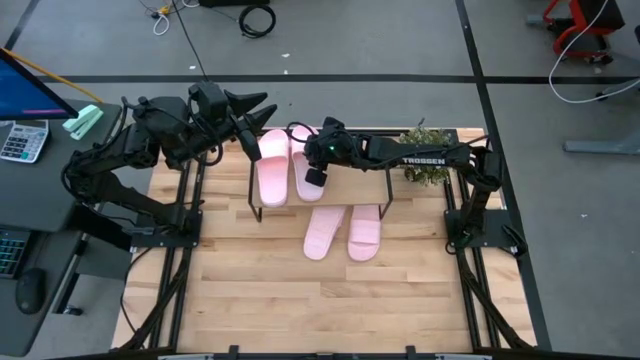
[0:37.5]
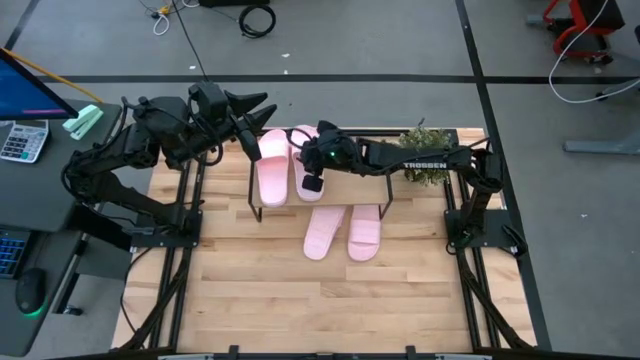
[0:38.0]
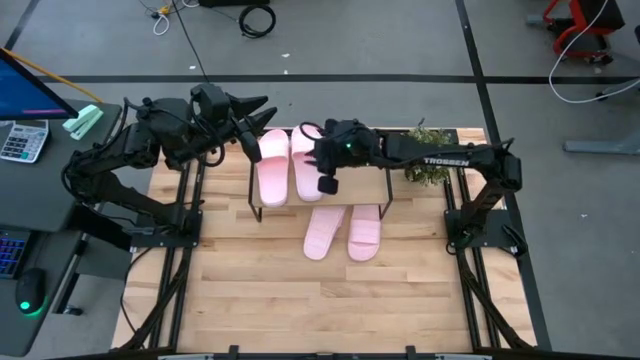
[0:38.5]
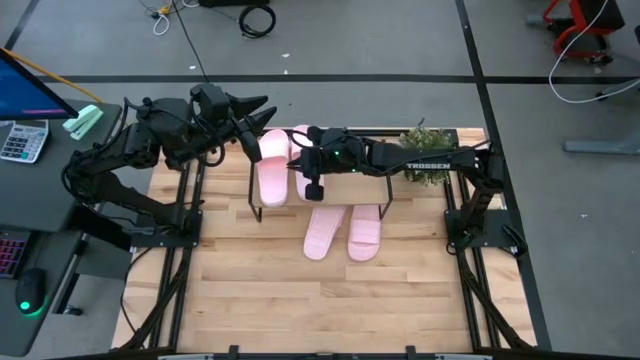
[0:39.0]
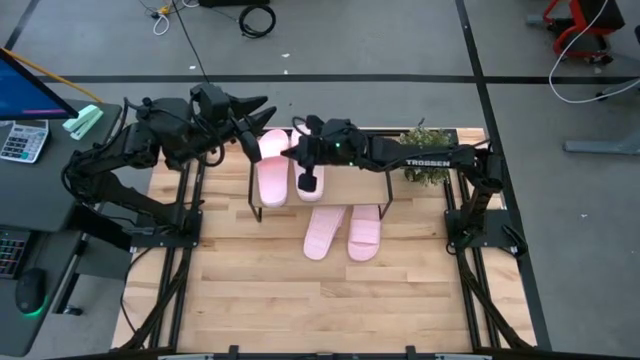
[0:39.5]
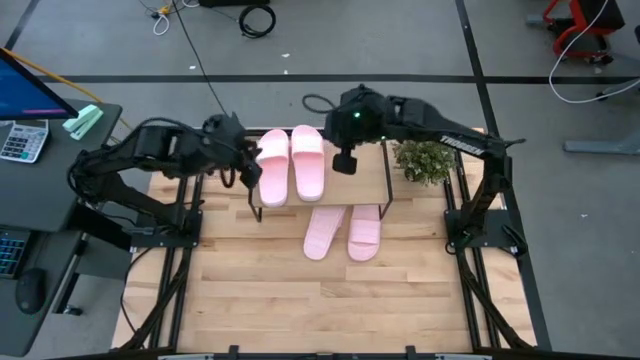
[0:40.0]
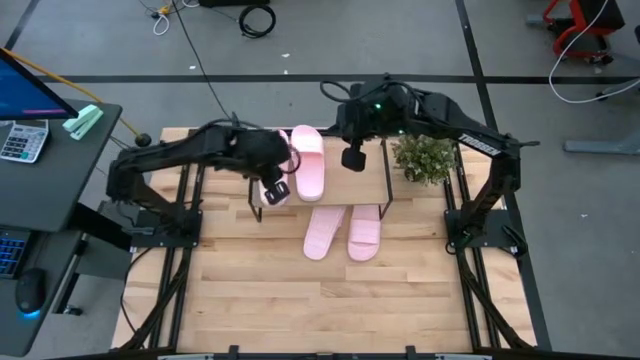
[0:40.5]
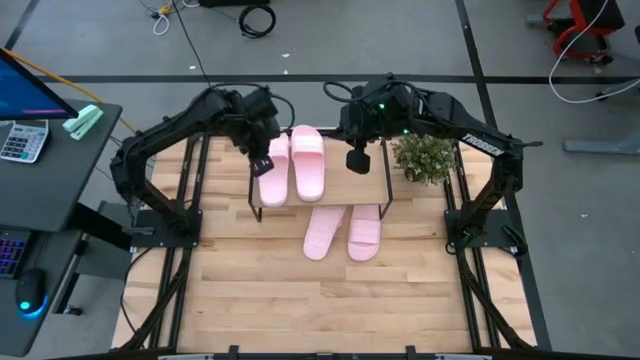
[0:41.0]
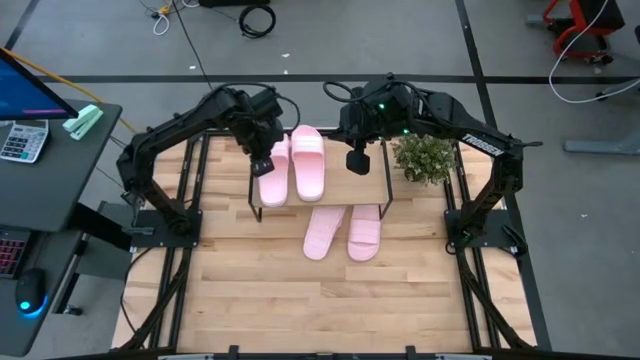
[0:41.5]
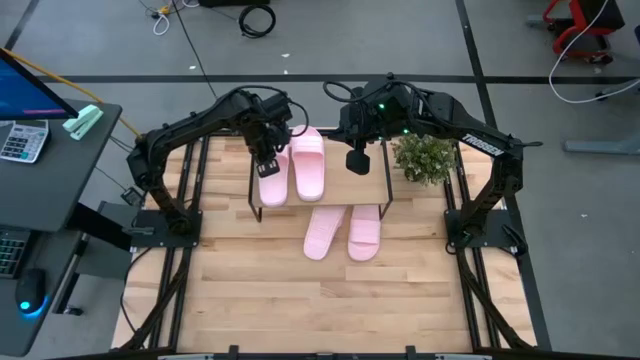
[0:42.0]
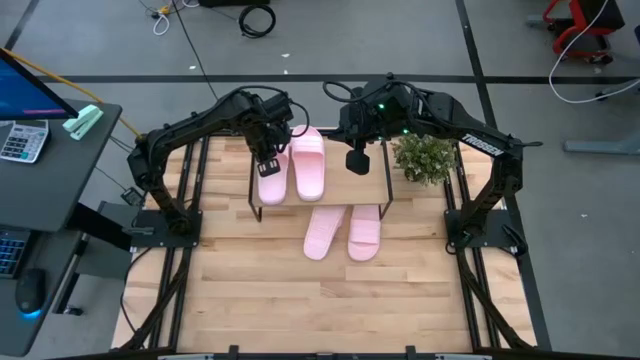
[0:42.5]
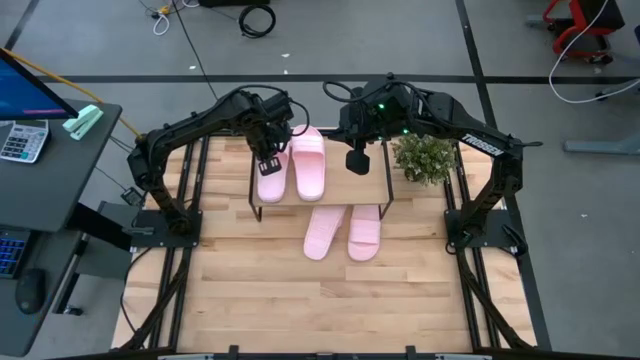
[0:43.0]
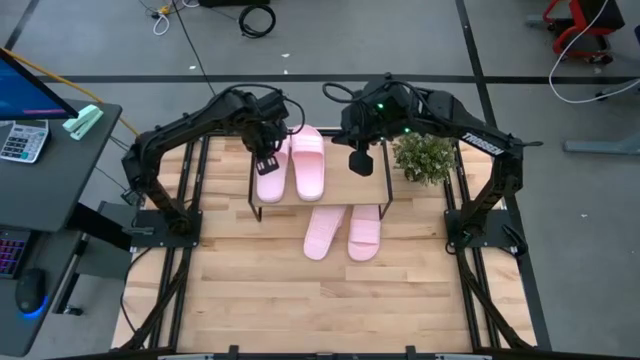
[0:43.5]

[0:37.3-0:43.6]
Task: Pick and place slides into the shelf
Adjust the pink slipper on the shelf

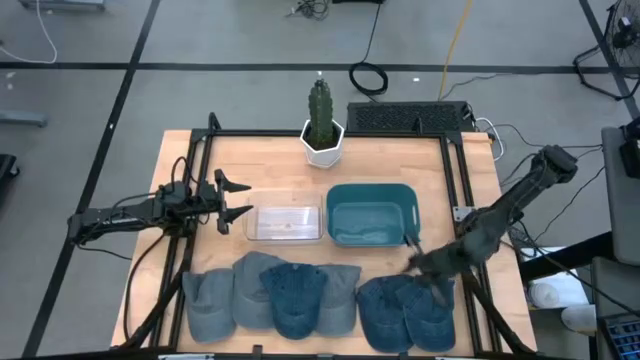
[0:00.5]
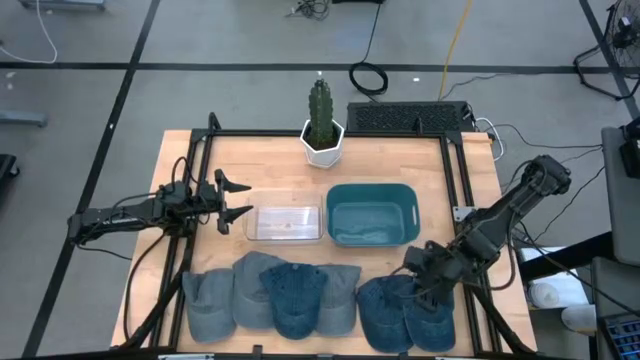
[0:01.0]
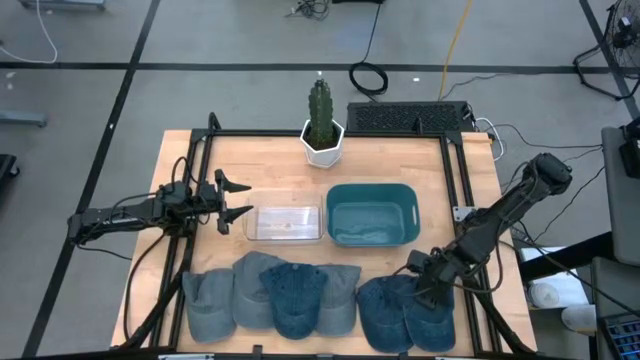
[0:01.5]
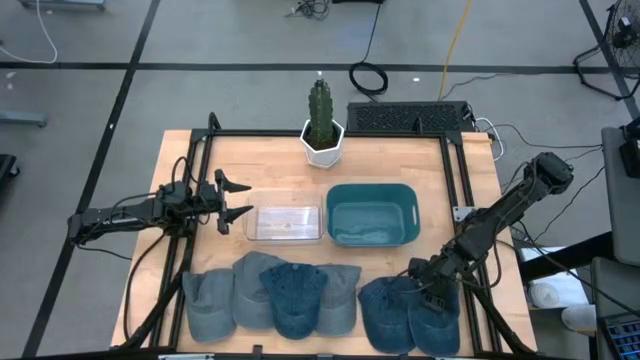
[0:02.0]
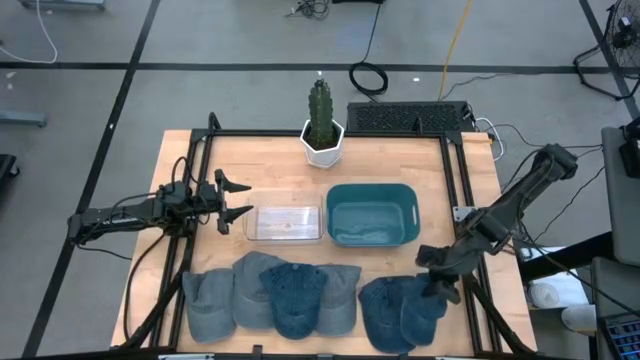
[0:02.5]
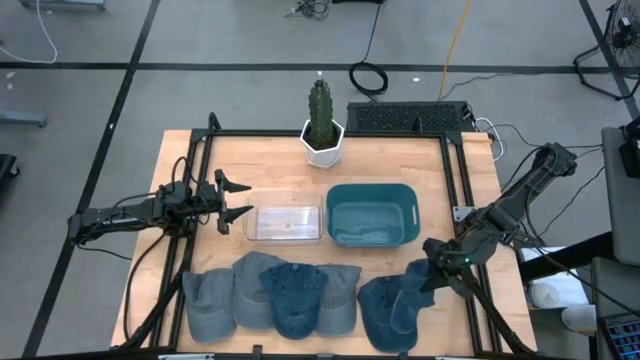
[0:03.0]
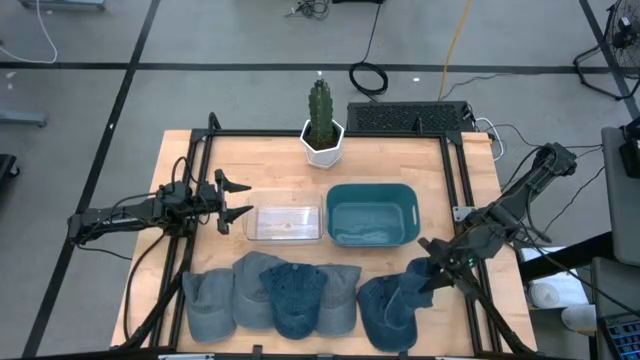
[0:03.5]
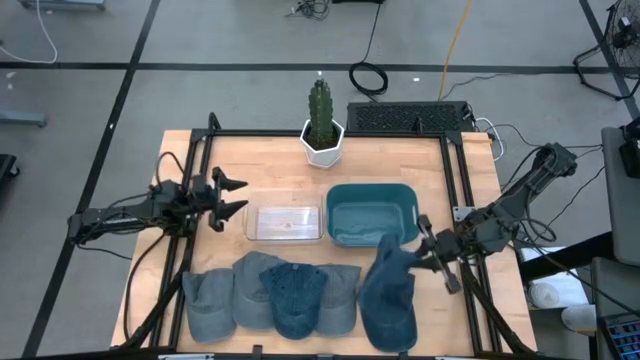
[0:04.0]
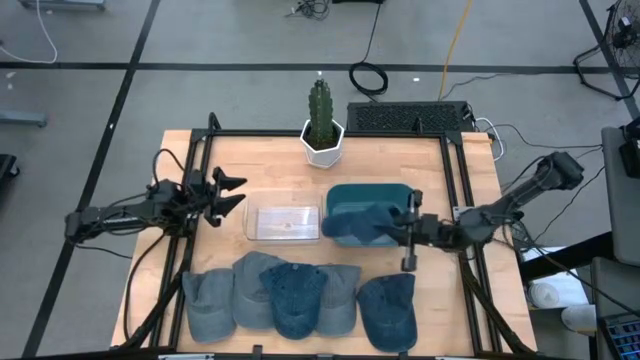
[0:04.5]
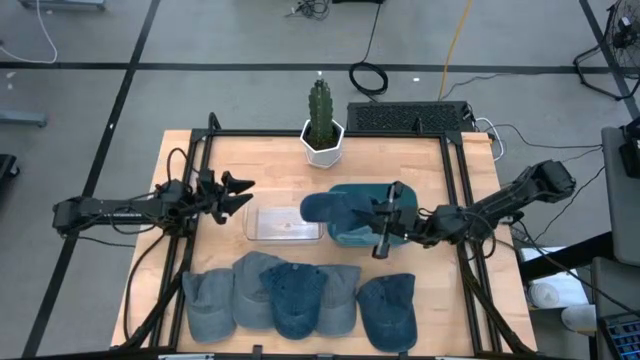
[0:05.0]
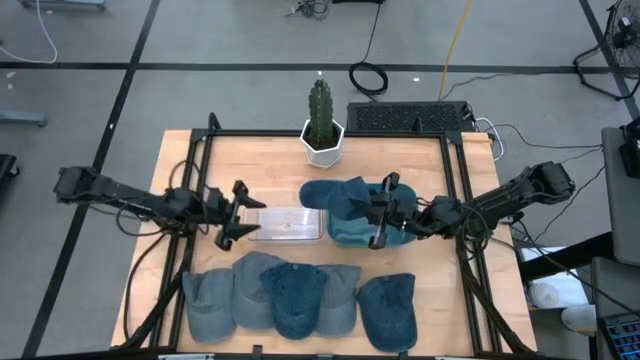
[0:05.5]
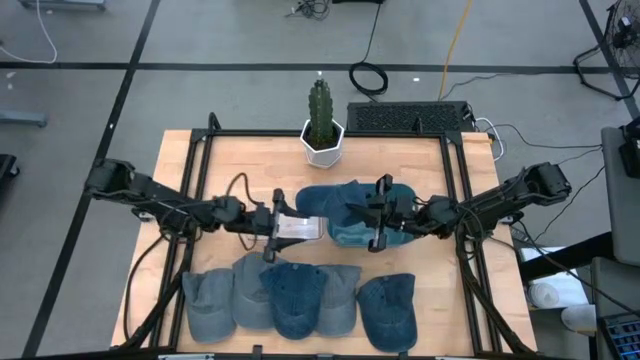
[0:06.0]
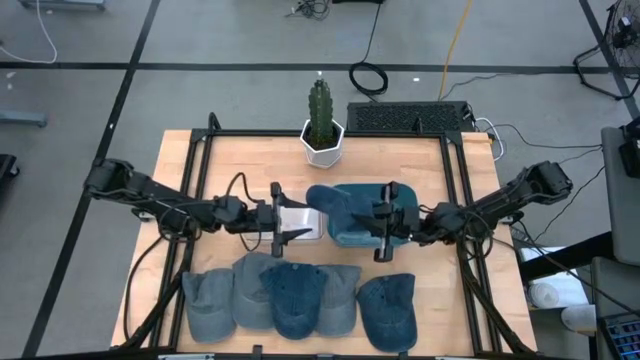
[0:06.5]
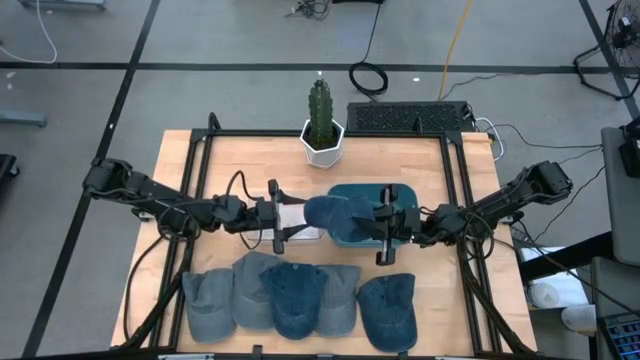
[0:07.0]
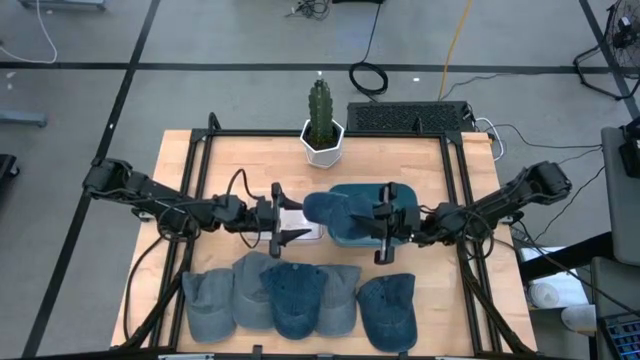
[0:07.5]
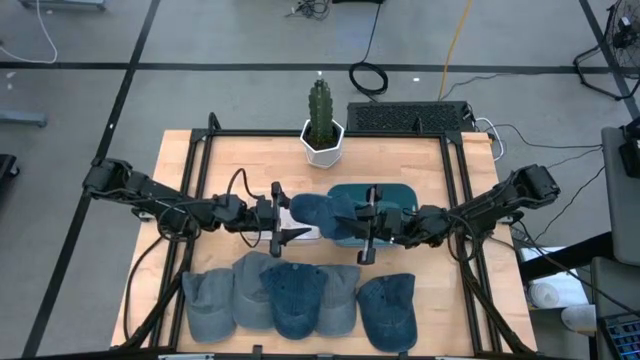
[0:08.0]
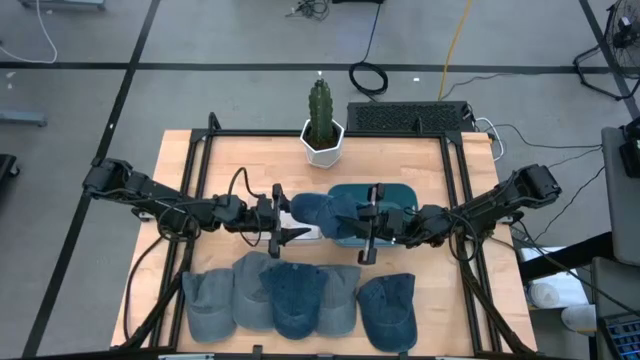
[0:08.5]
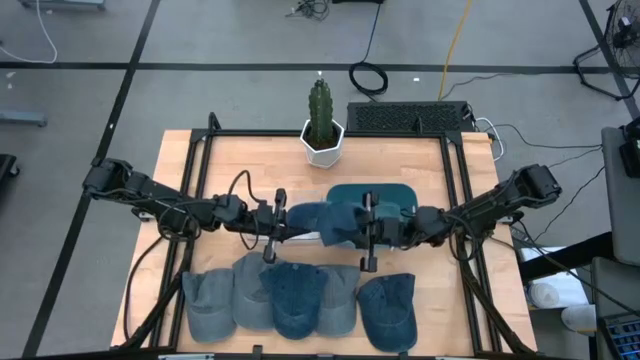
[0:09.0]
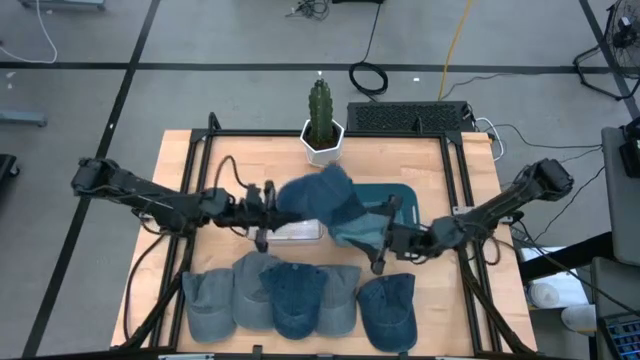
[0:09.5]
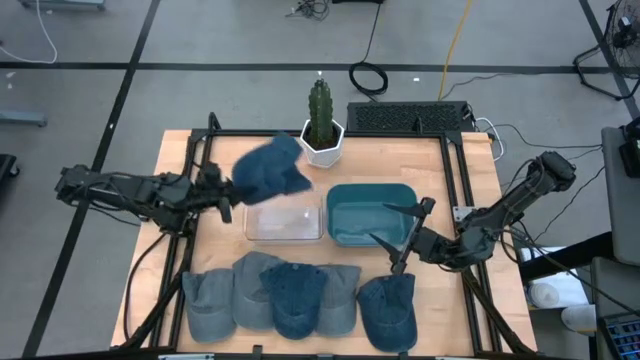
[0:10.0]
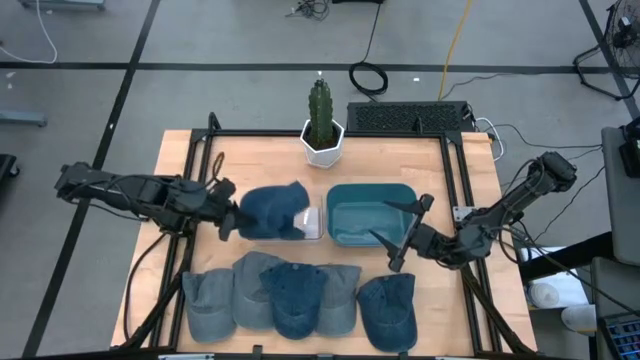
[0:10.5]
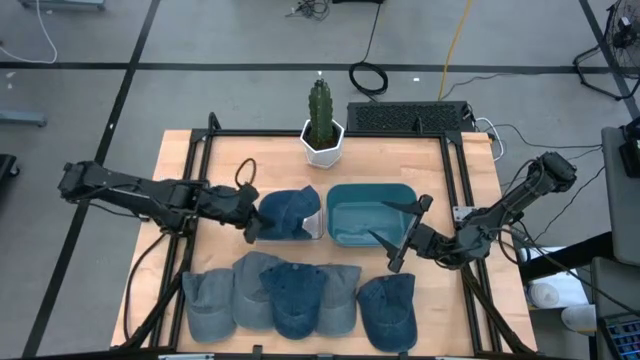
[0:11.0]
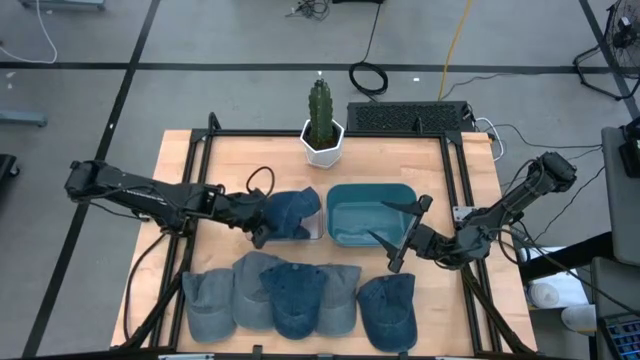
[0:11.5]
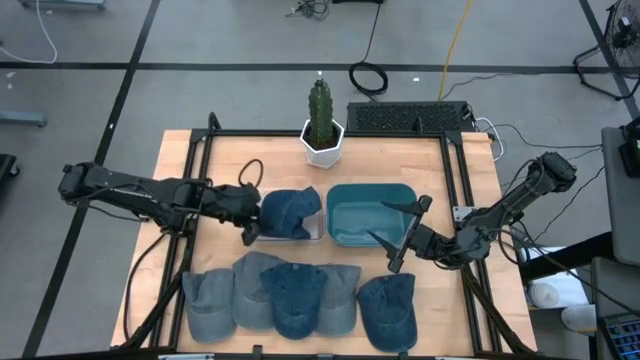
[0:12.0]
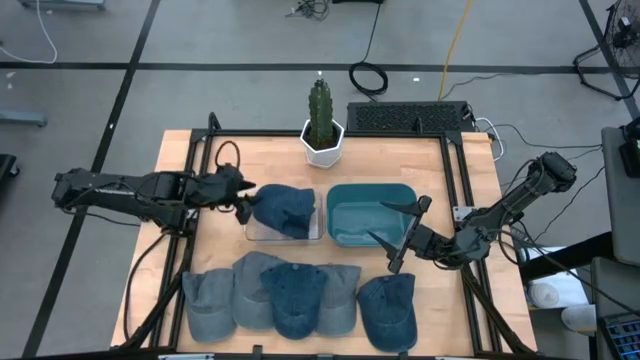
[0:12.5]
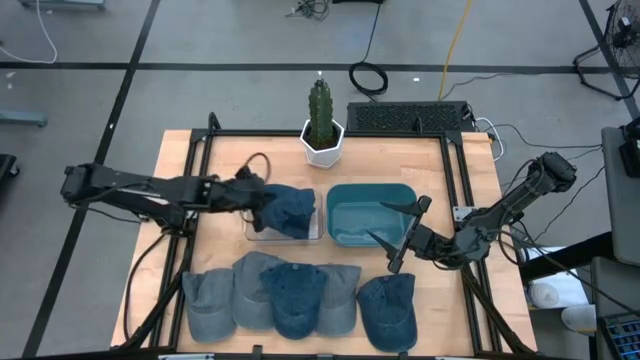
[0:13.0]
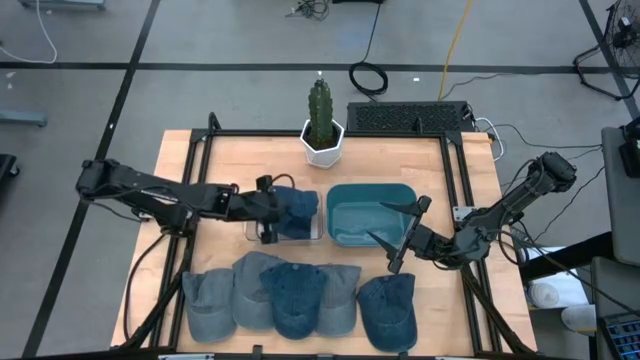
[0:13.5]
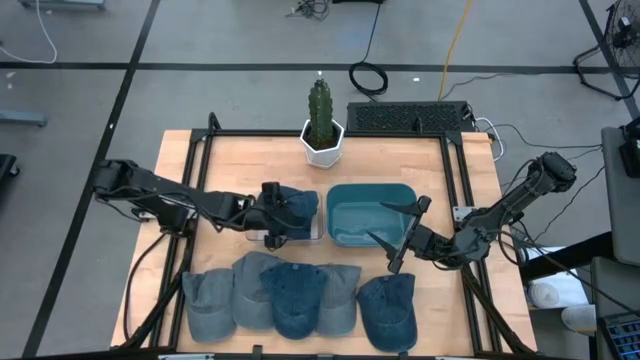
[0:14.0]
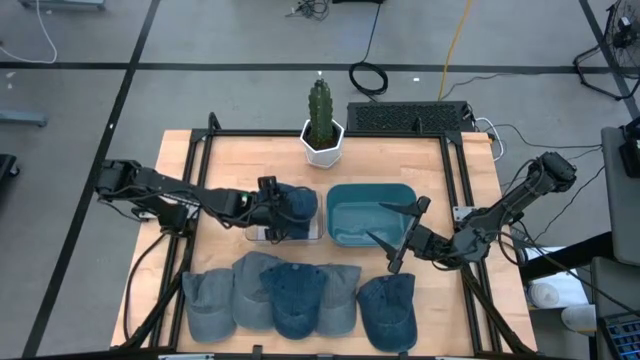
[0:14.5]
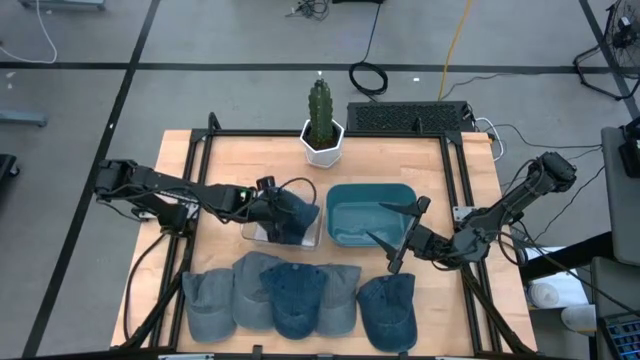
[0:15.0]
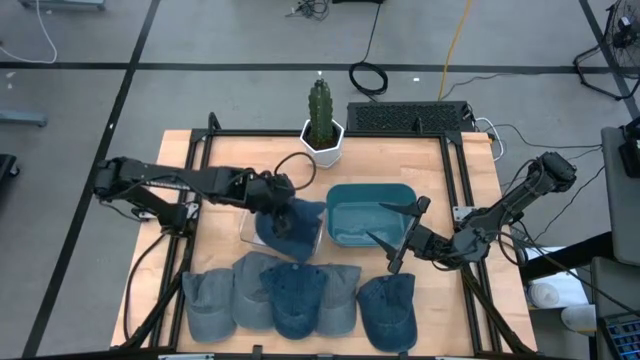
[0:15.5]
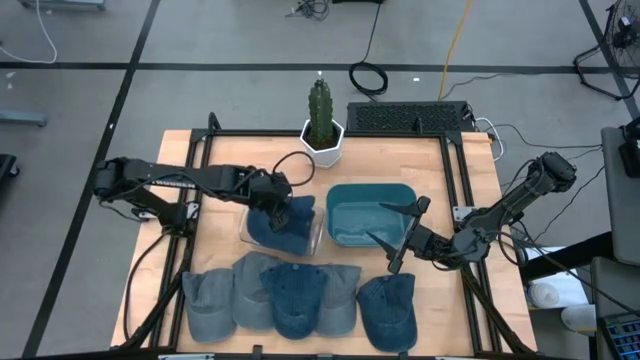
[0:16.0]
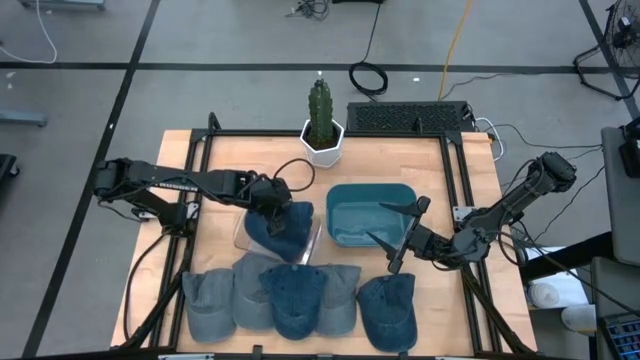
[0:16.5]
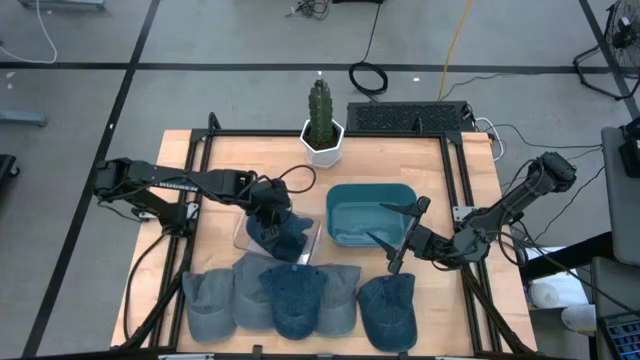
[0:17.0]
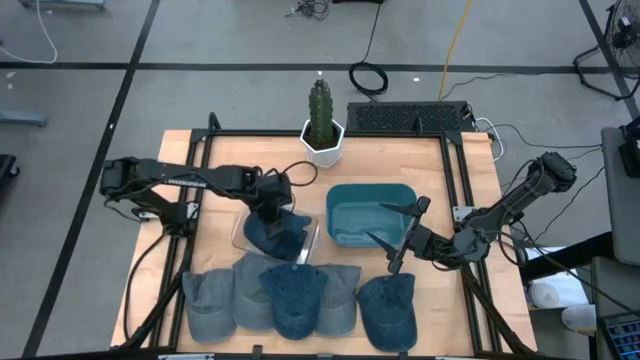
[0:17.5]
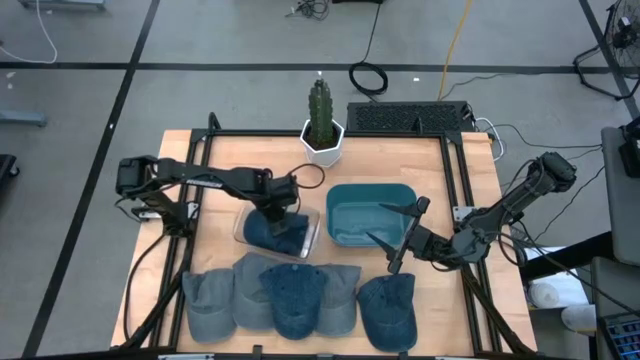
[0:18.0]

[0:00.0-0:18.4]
Task: Pick & Place hat
Put the right blue cap into the transparent bin
